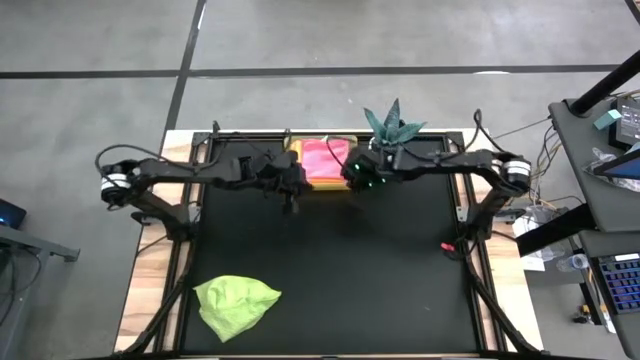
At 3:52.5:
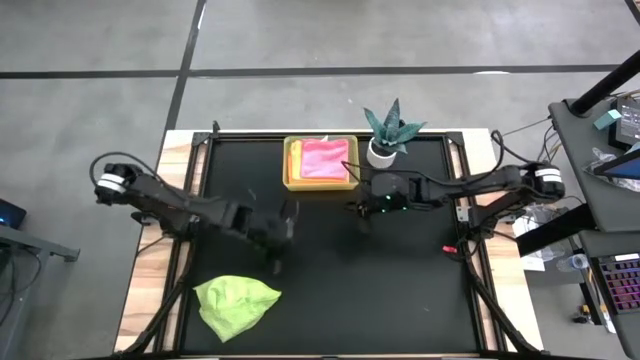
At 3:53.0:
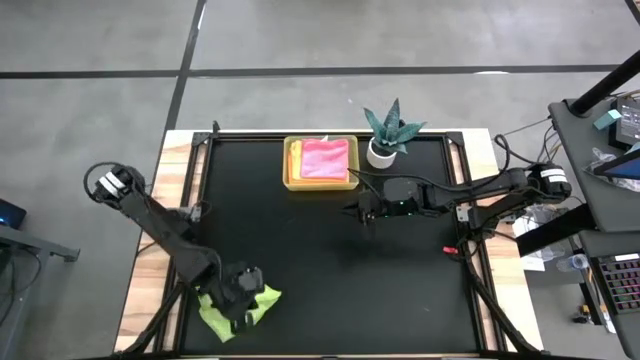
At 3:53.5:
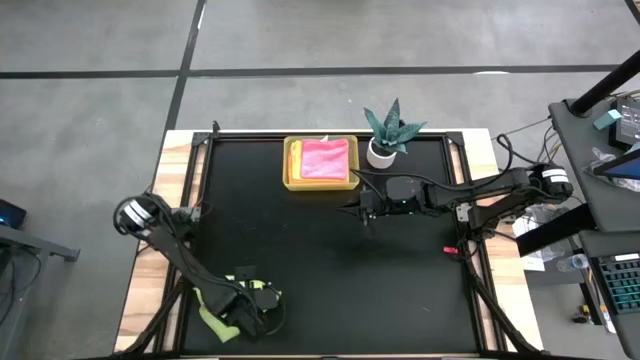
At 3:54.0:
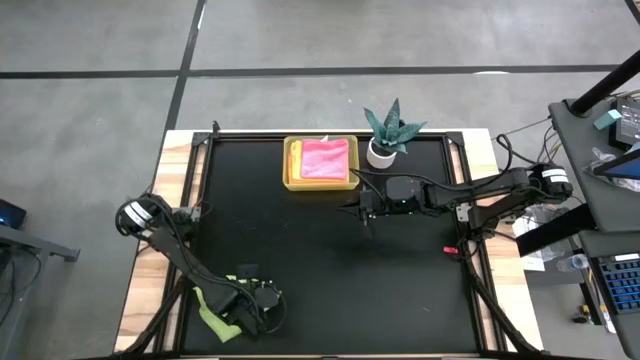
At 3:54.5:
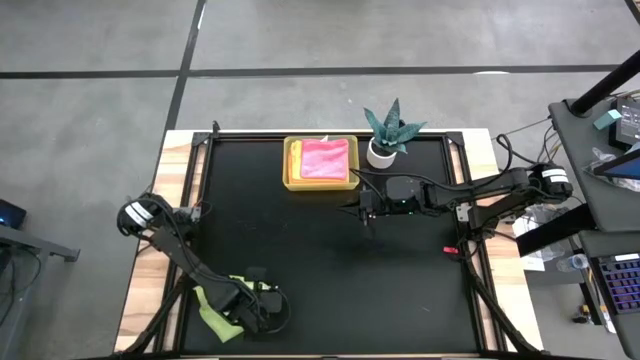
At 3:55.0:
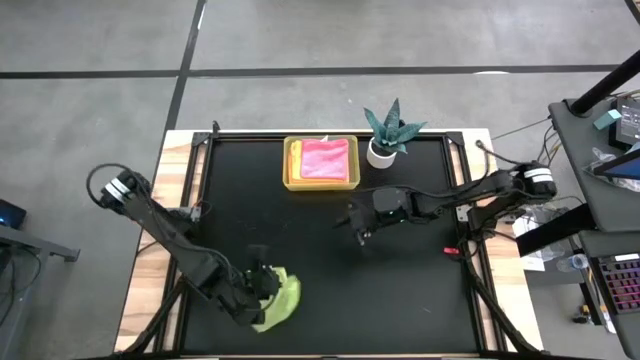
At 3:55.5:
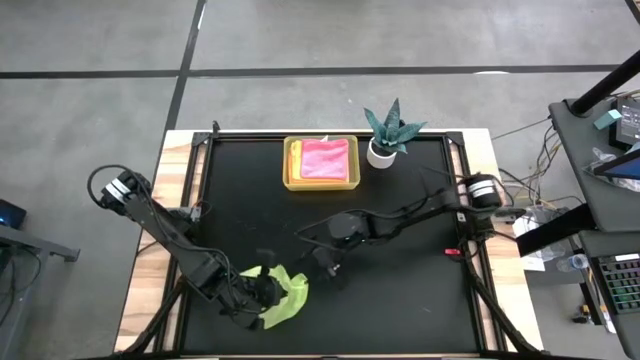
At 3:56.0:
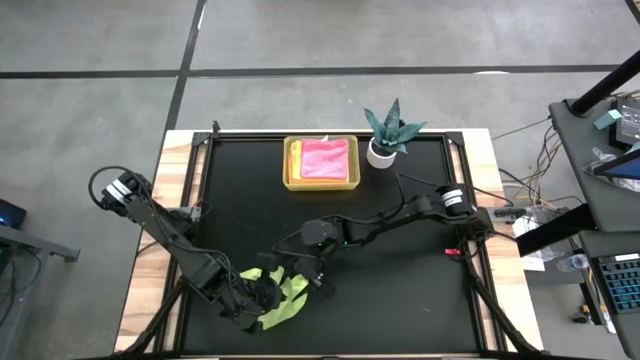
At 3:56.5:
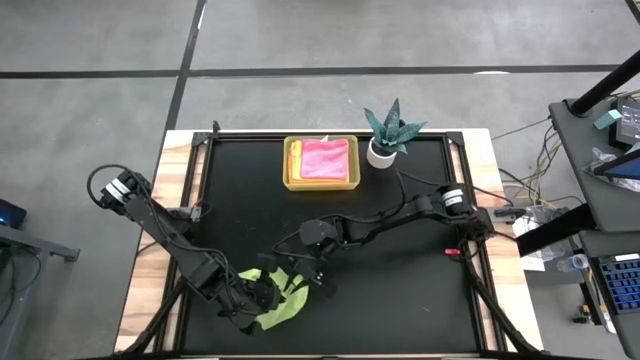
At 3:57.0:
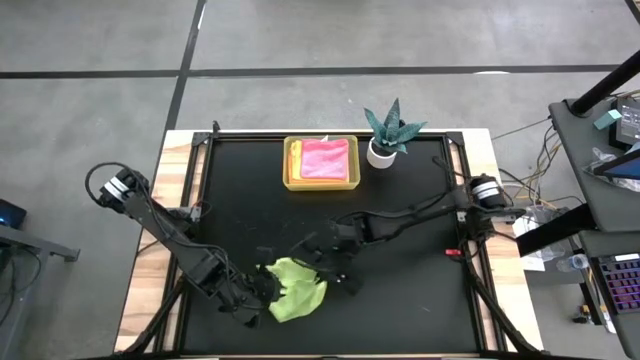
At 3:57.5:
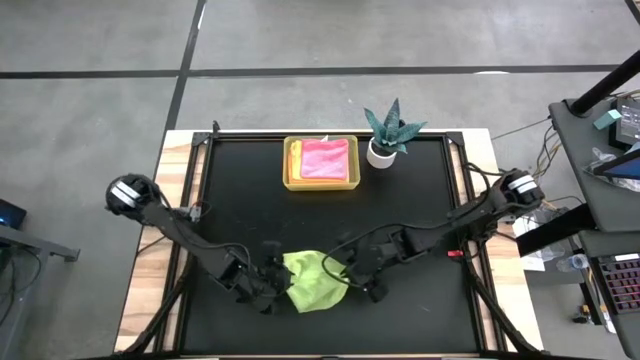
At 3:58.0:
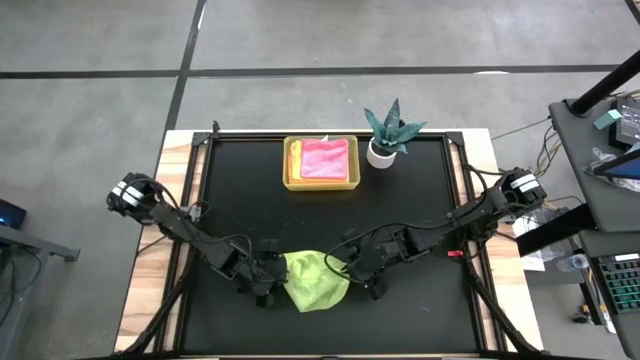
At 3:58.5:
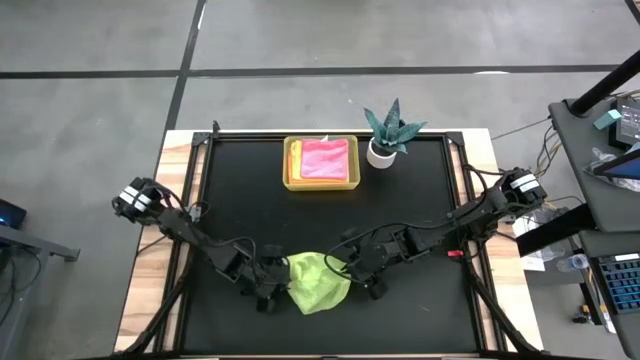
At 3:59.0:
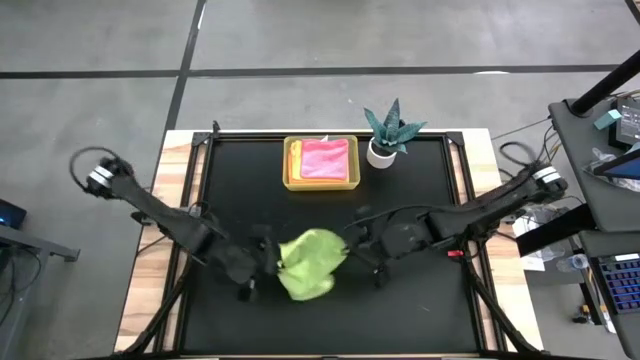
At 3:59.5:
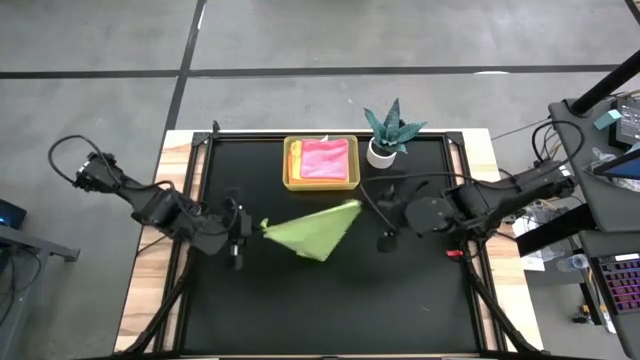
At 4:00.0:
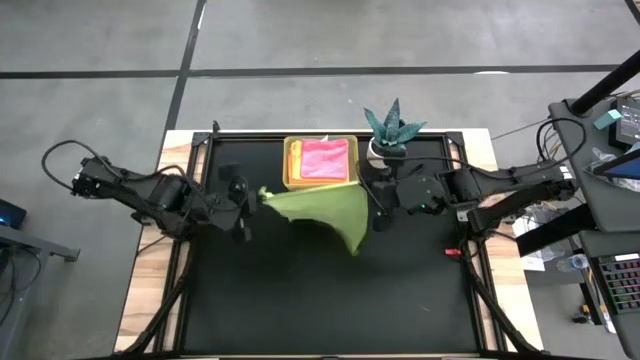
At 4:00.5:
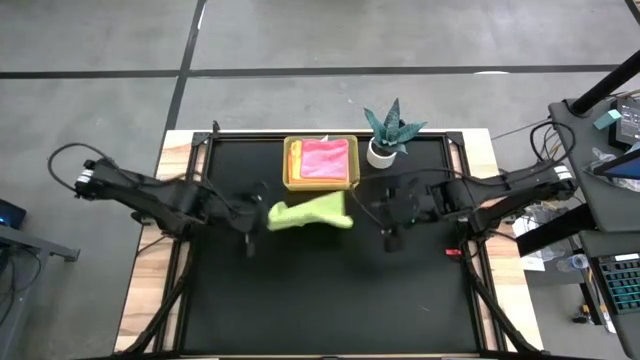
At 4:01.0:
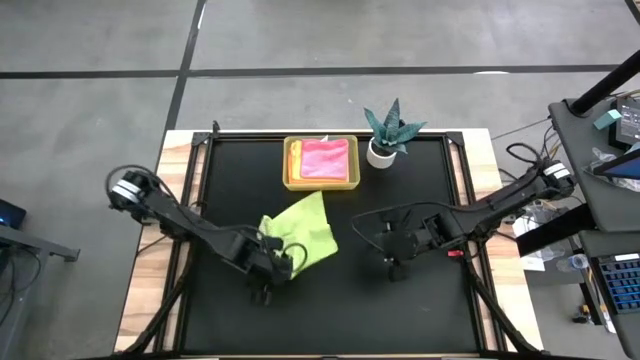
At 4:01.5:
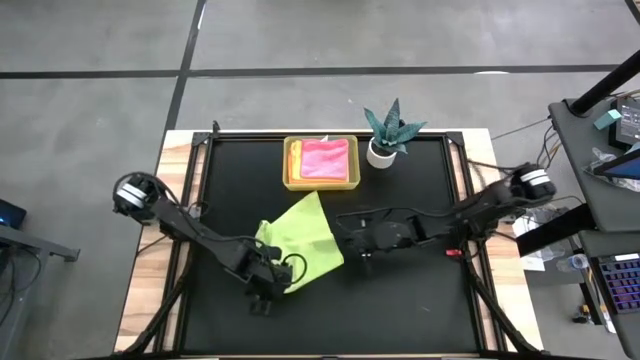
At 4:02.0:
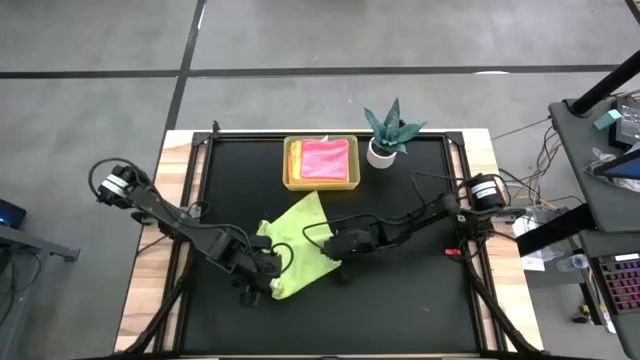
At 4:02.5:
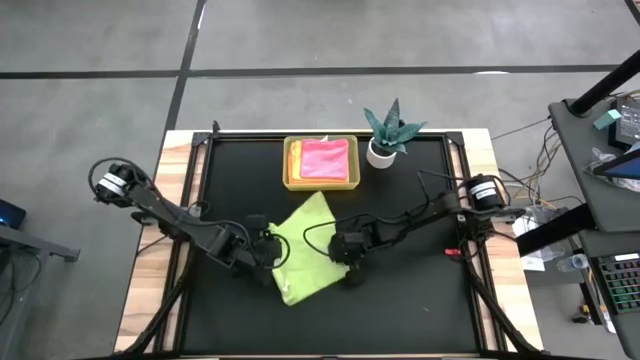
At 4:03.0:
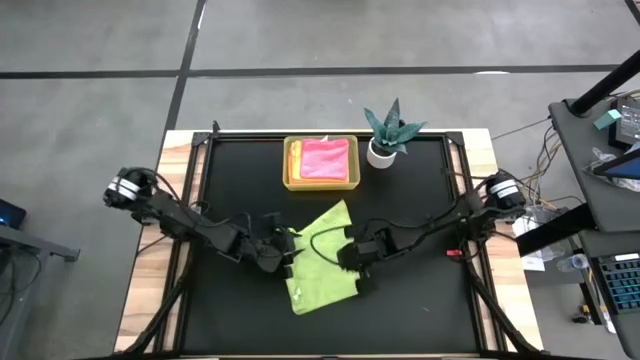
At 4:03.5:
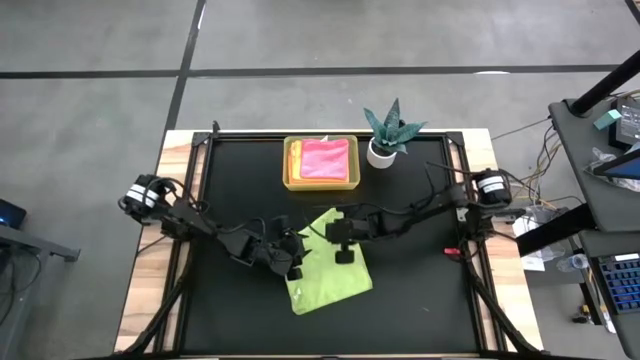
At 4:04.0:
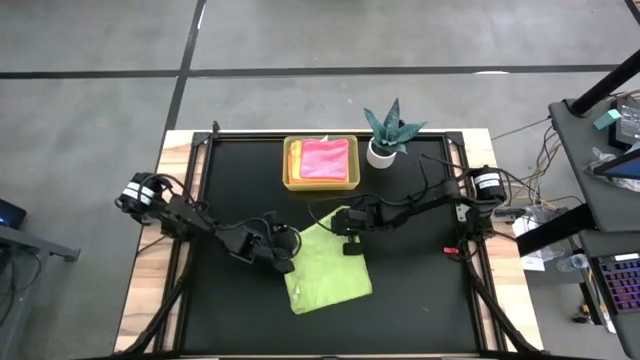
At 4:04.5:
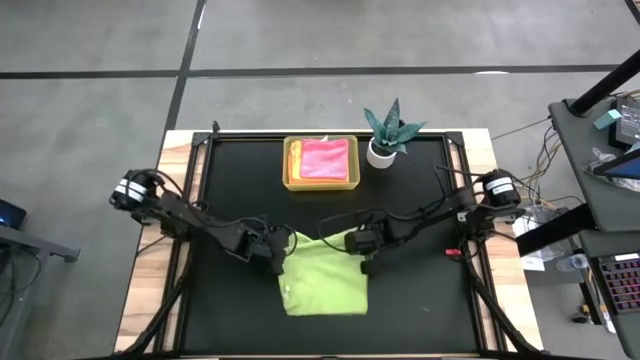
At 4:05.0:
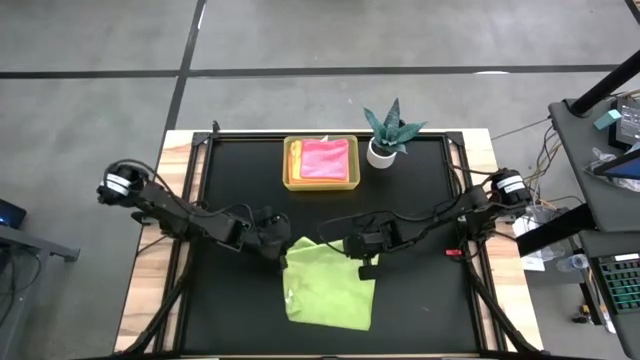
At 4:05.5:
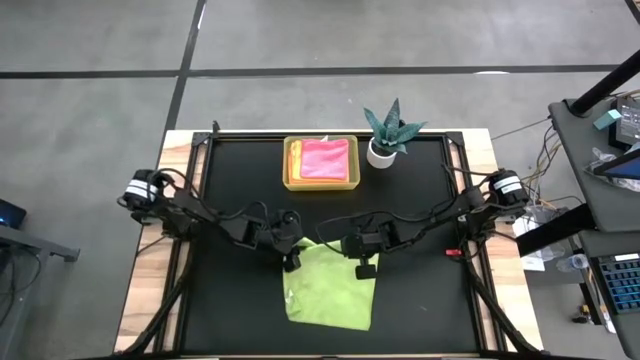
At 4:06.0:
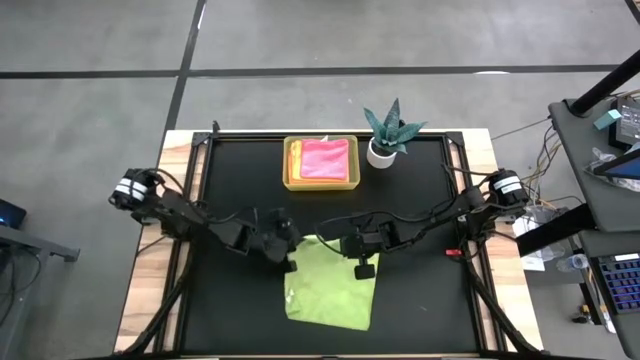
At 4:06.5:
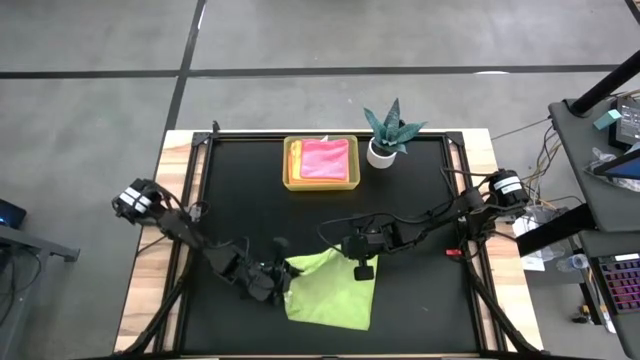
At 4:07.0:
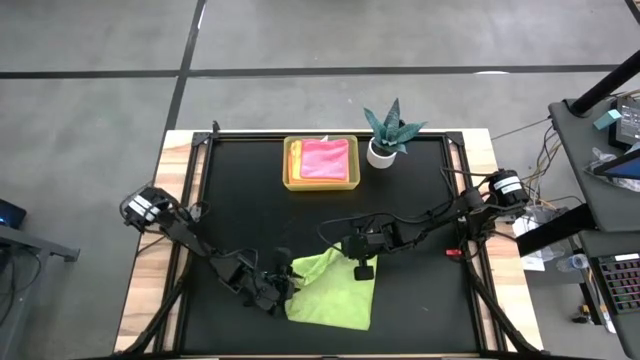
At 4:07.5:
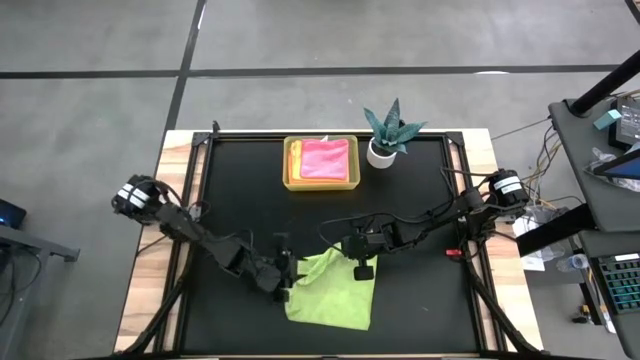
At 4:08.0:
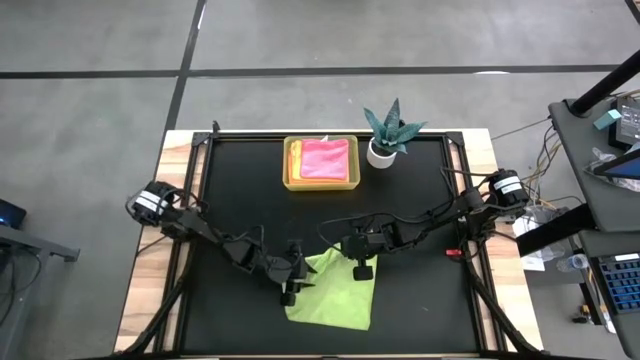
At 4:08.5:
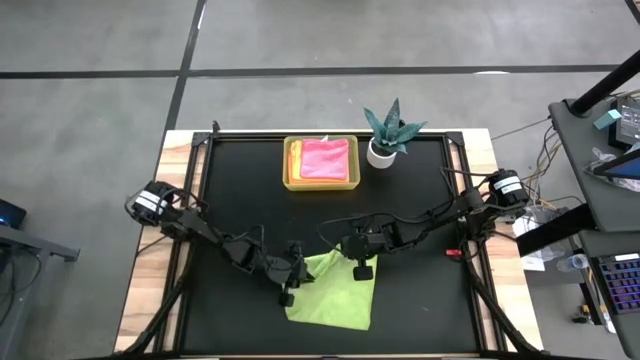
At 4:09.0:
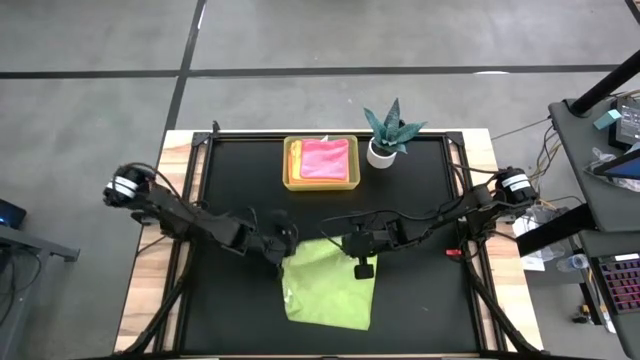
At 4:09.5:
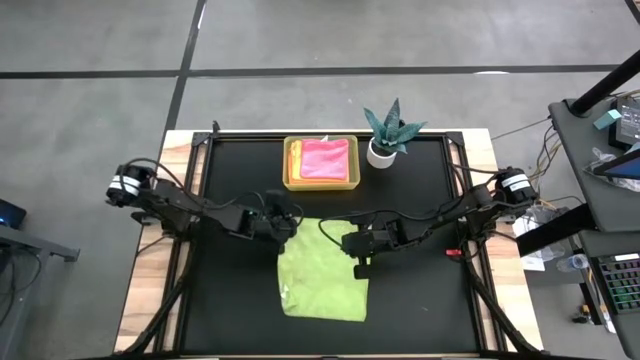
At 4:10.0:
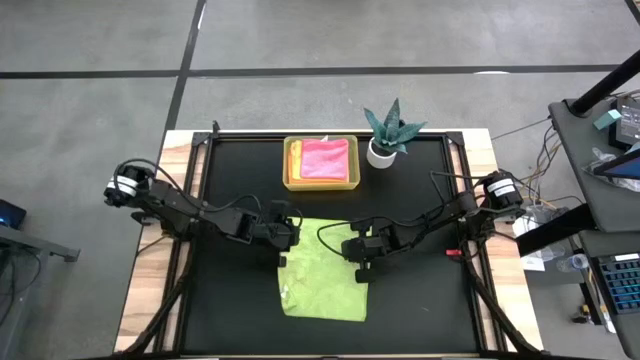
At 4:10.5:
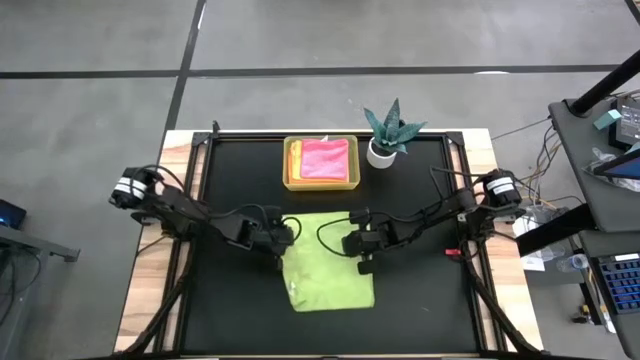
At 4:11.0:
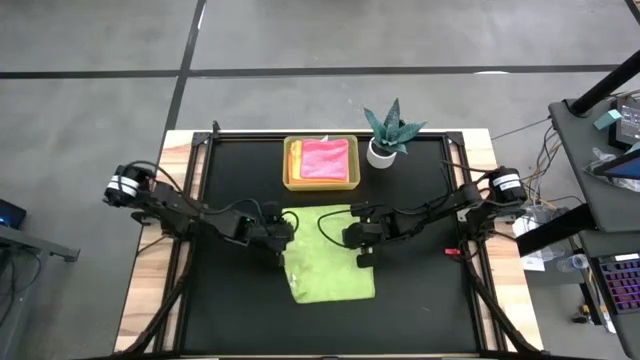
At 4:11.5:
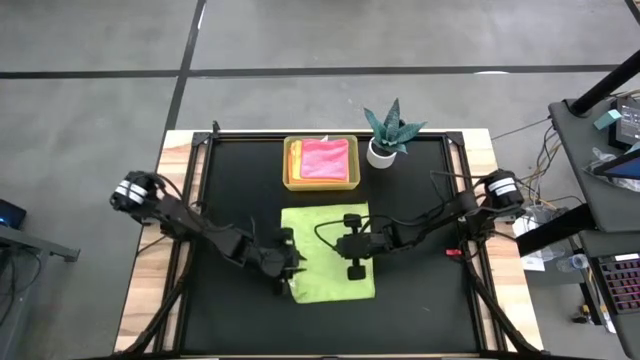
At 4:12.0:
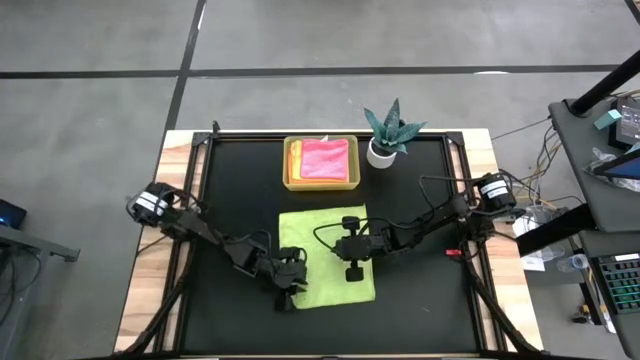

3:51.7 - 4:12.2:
Task: Fold microfiber towels
Fold the green microfiber cloth

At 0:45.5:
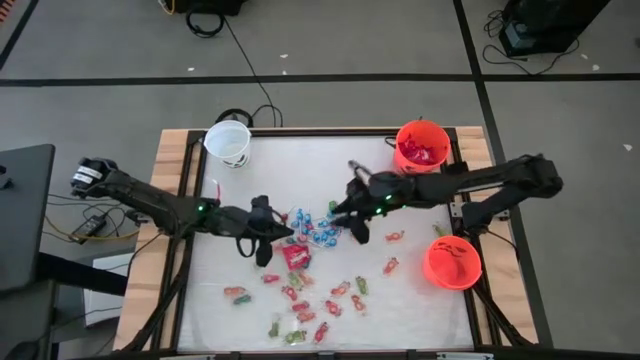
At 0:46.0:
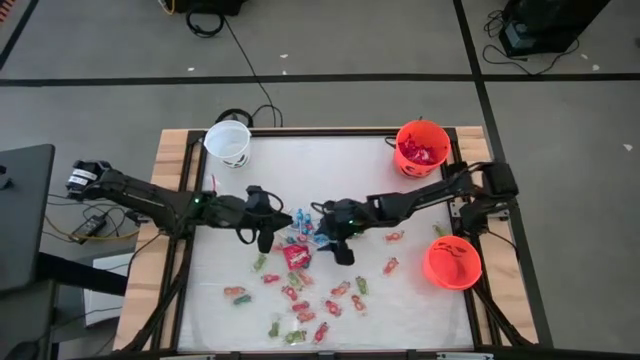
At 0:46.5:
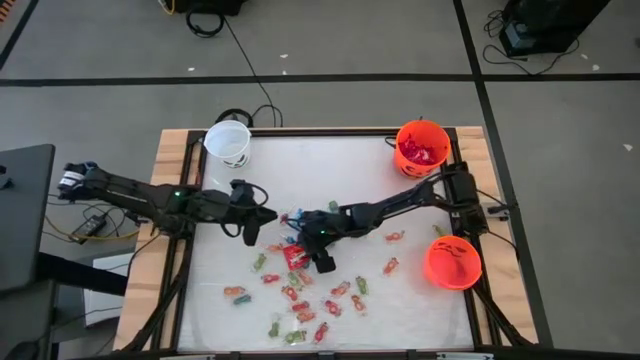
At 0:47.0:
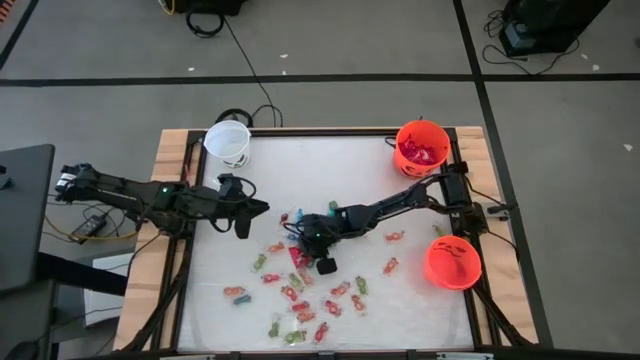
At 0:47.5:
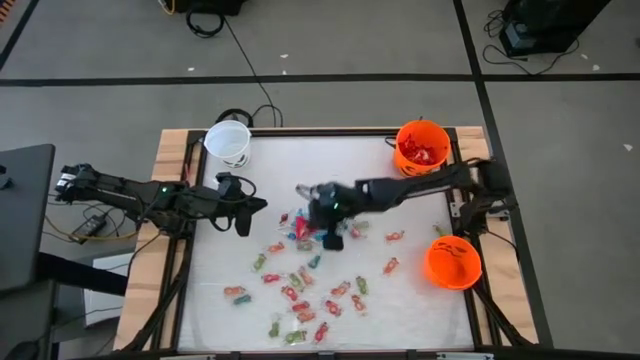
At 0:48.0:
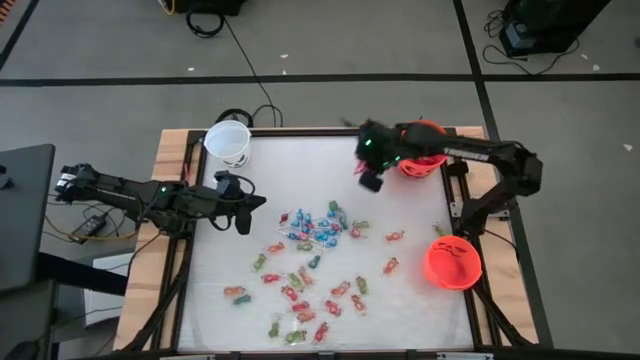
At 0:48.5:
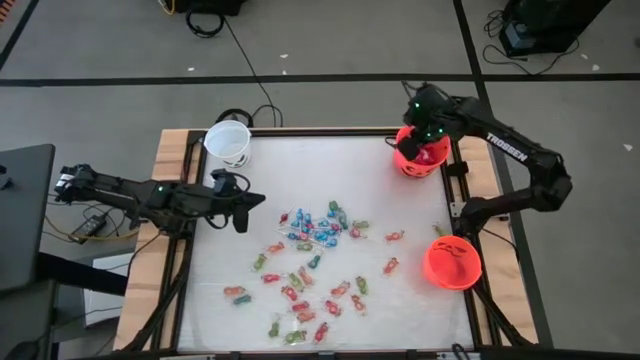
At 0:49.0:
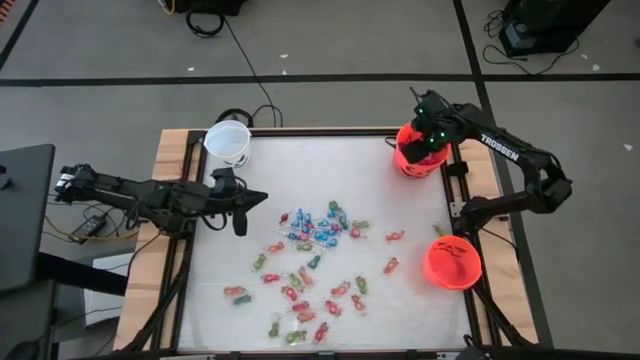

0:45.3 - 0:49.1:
Task: Sort candy by brand, put in halloween buckets
Put the red candy into the top orange bucket
